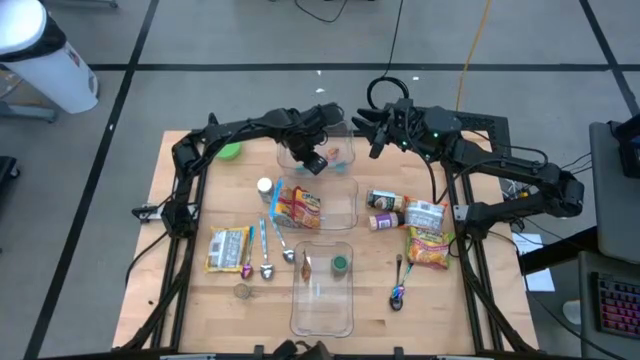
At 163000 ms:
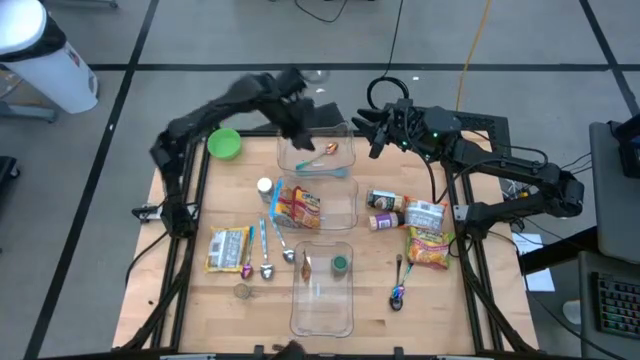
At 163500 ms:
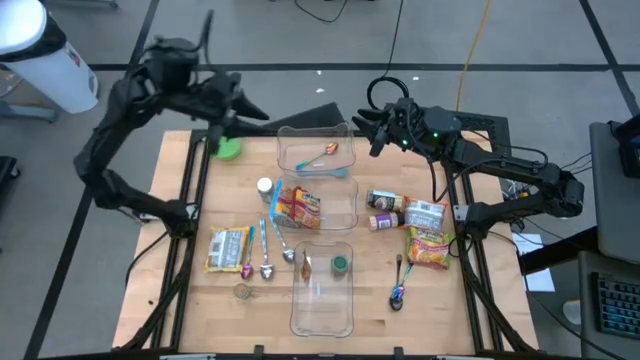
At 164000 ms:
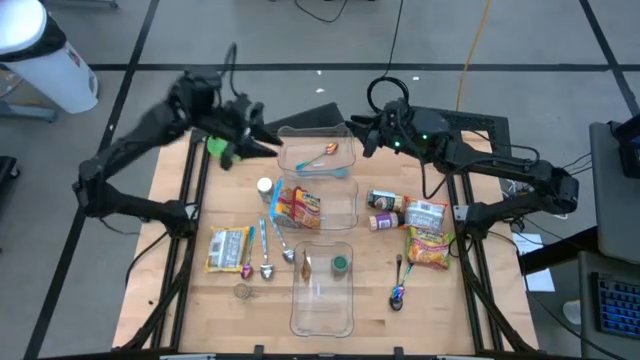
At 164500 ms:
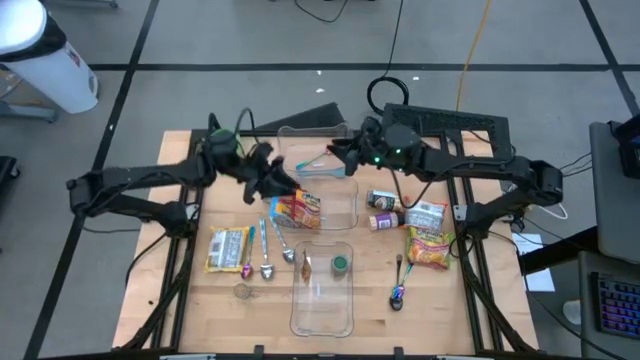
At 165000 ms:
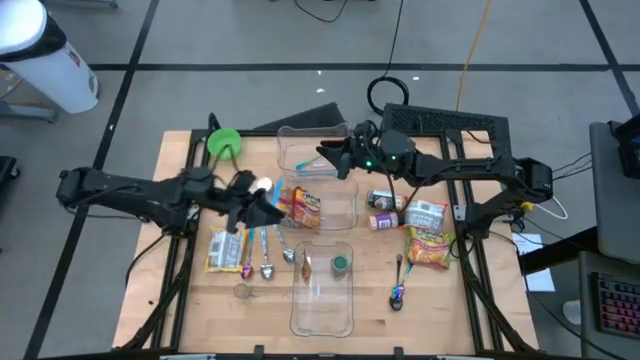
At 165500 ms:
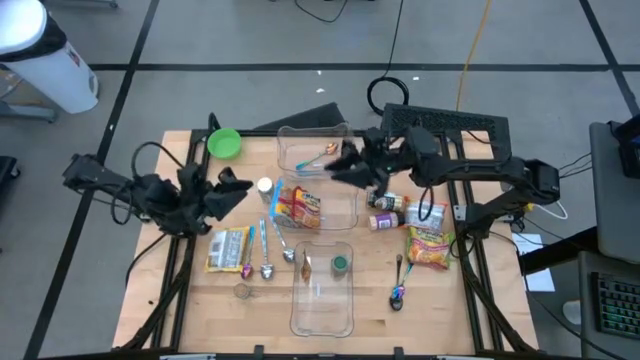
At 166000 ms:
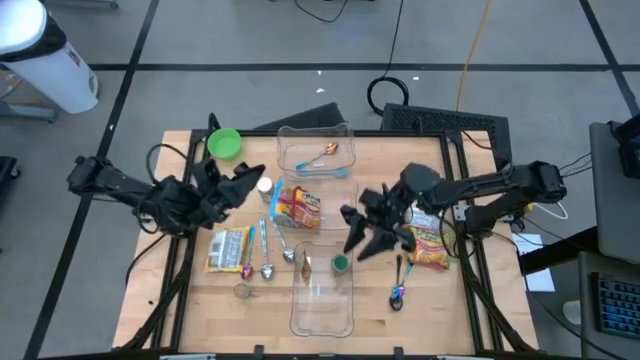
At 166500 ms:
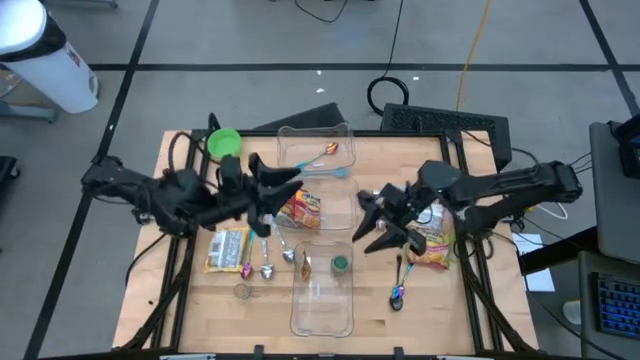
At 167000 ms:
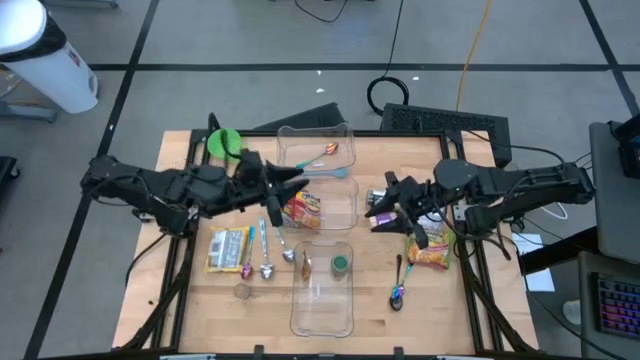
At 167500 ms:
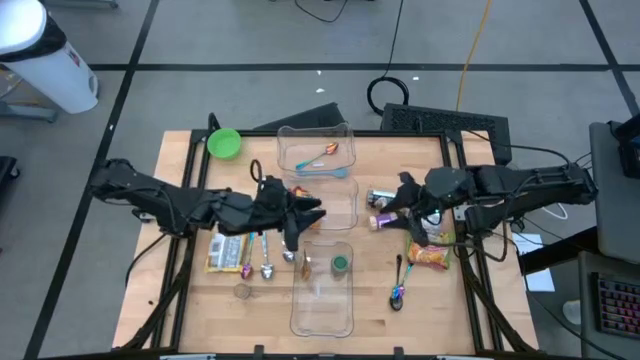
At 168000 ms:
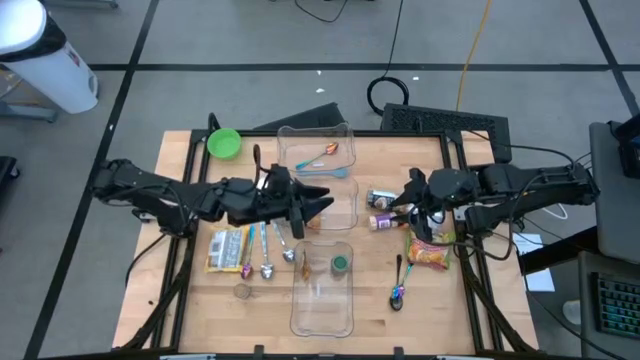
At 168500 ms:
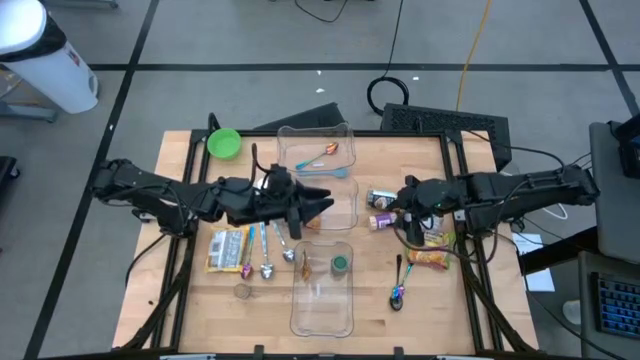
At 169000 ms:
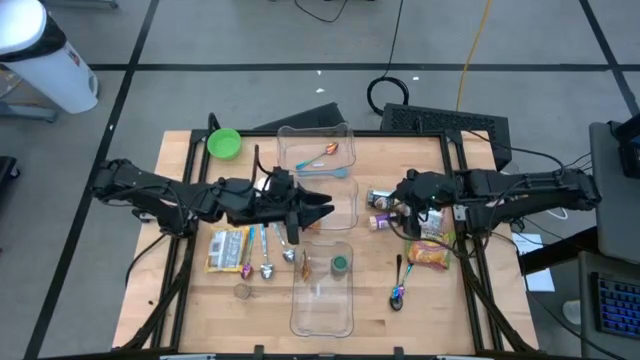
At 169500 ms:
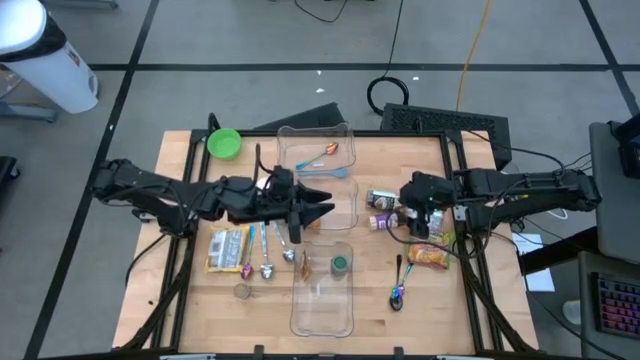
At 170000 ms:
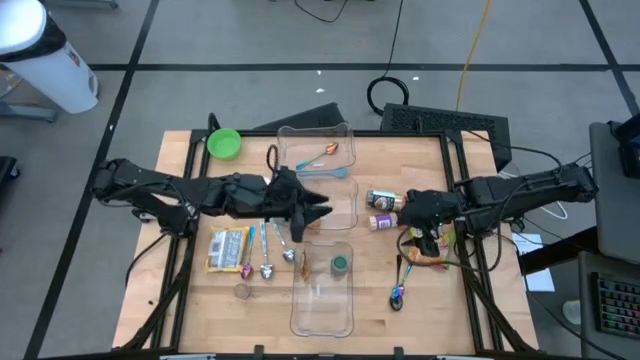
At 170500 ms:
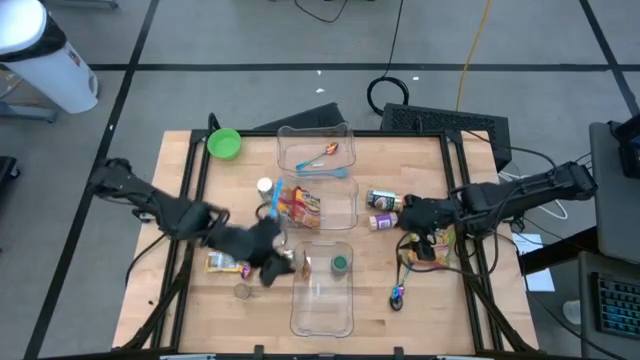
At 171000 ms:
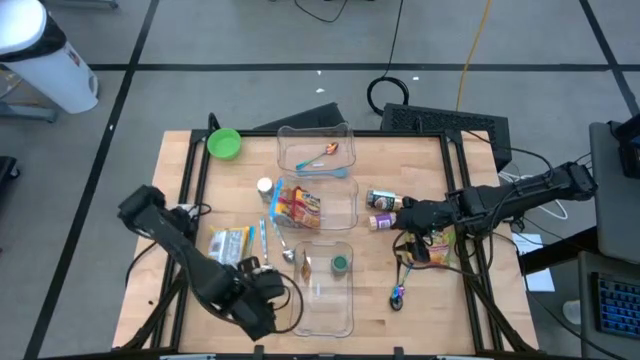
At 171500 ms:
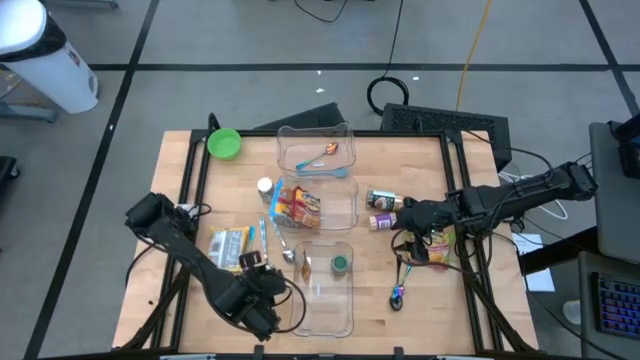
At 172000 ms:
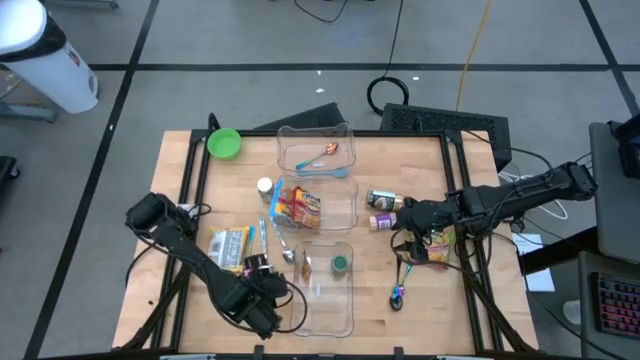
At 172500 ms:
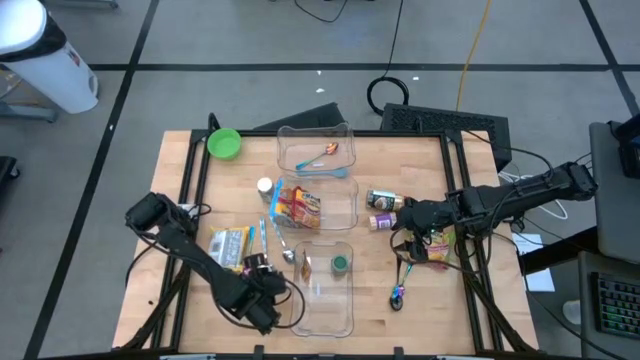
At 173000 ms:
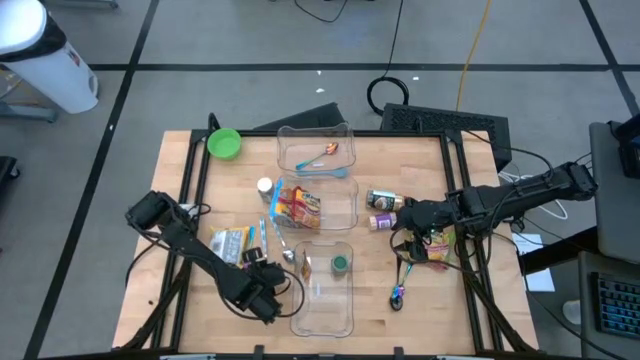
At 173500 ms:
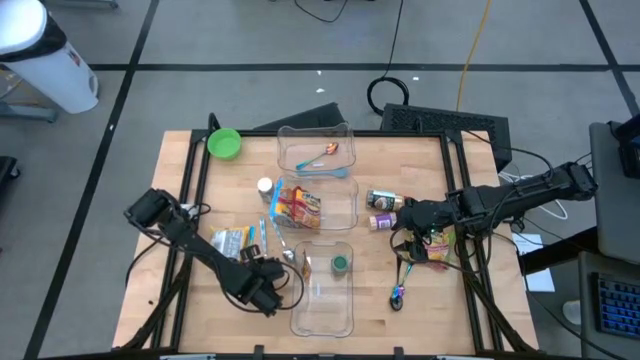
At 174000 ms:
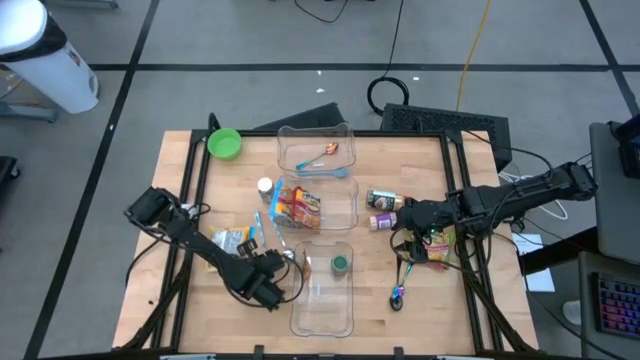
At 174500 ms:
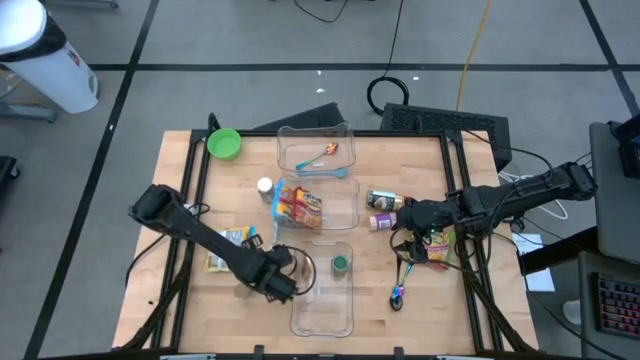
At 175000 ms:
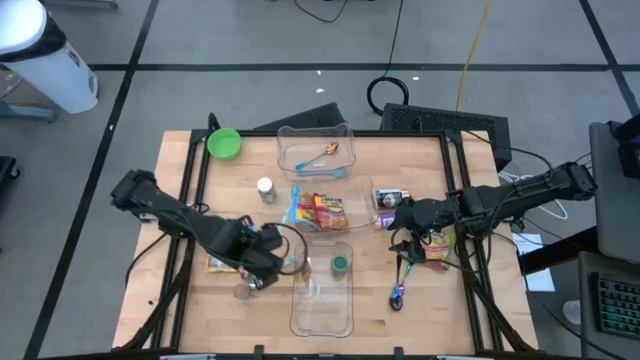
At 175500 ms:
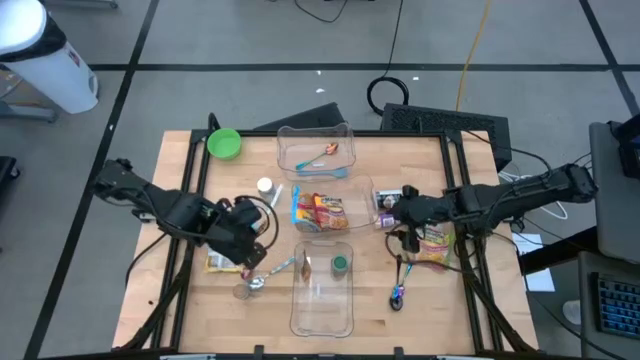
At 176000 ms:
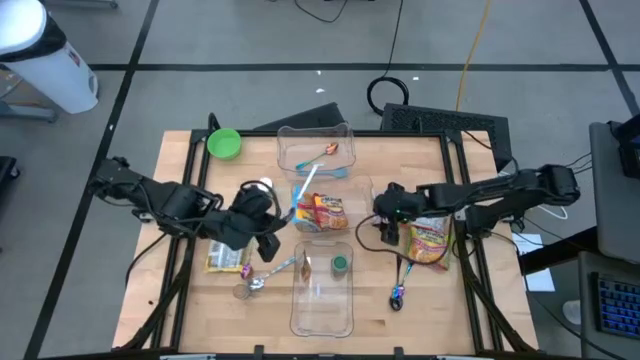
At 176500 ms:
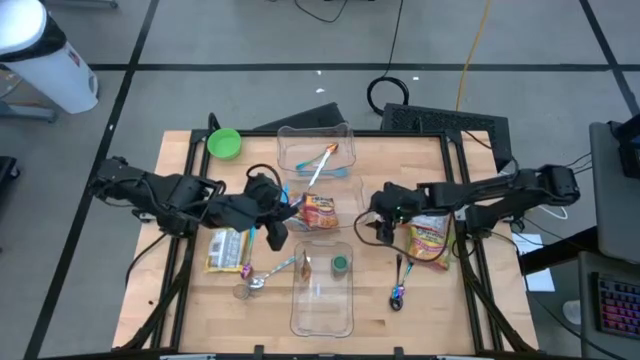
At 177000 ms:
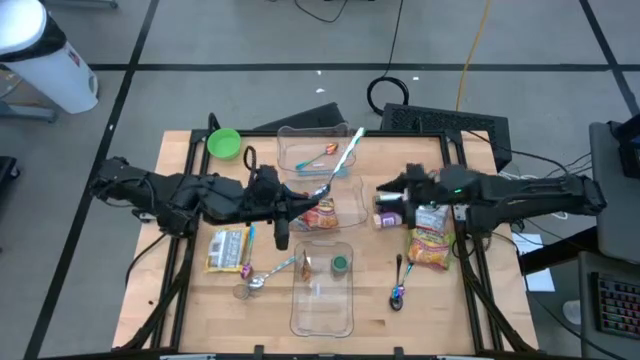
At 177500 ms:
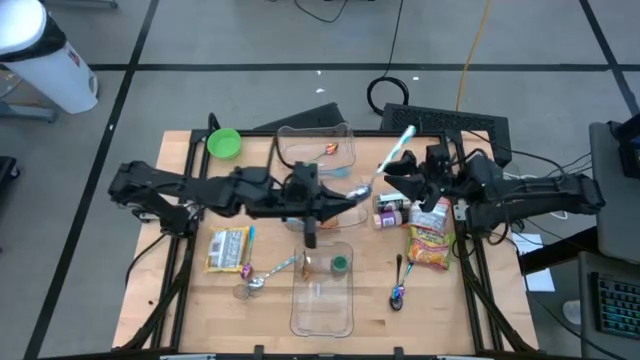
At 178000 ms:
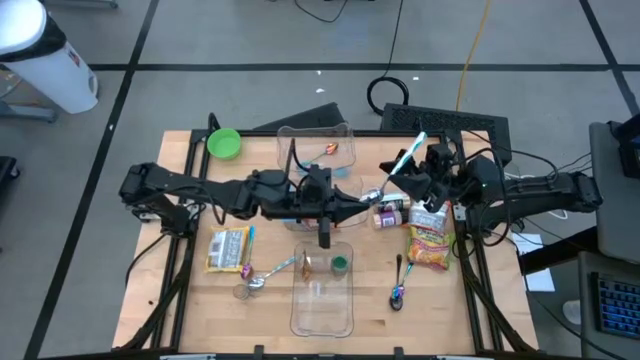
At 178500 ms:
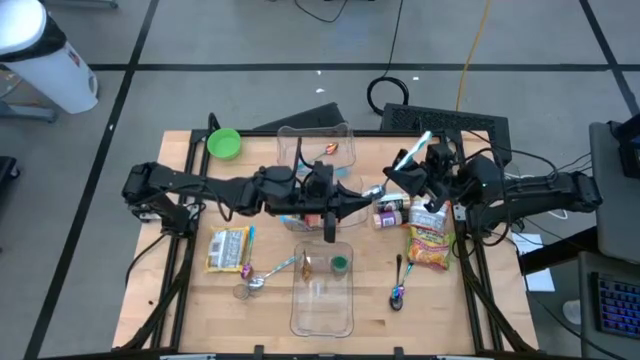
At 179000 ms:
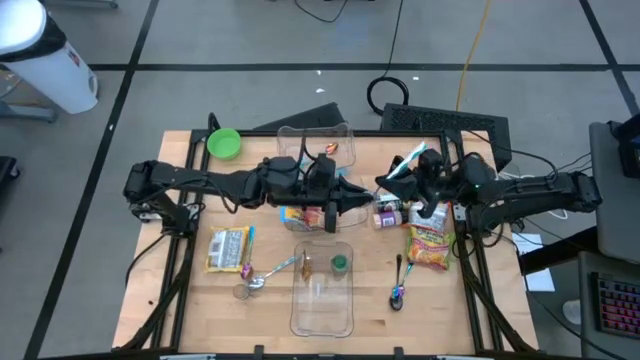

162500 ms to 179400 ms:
Task: Pick & Place Food Item
Put the left blue patterned spoon into the top transparent bin

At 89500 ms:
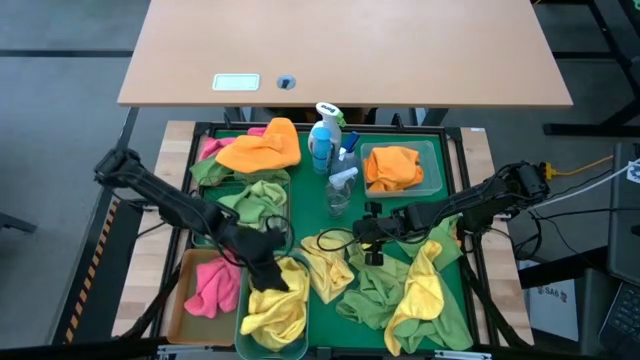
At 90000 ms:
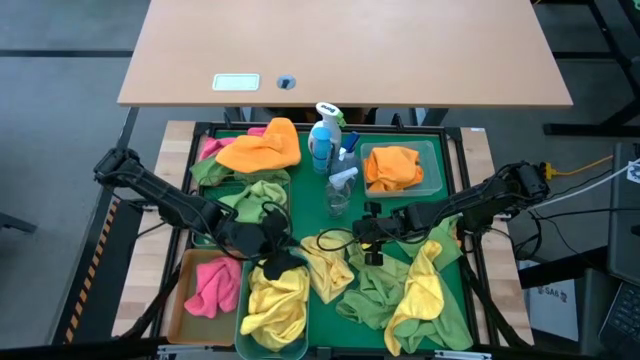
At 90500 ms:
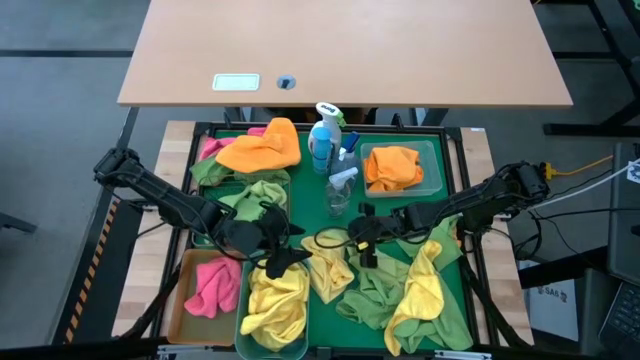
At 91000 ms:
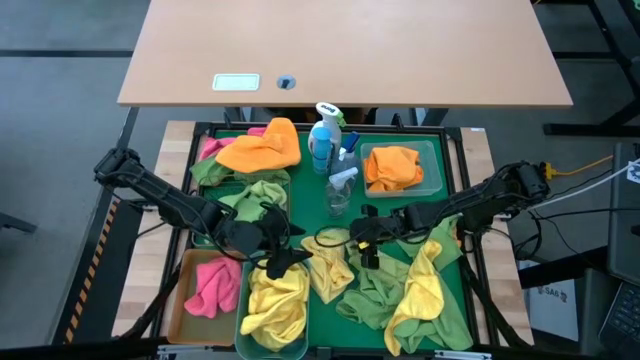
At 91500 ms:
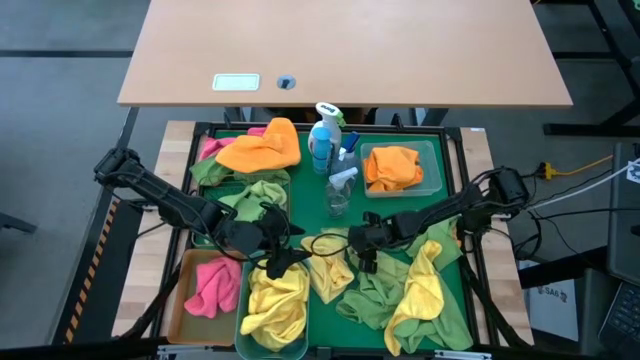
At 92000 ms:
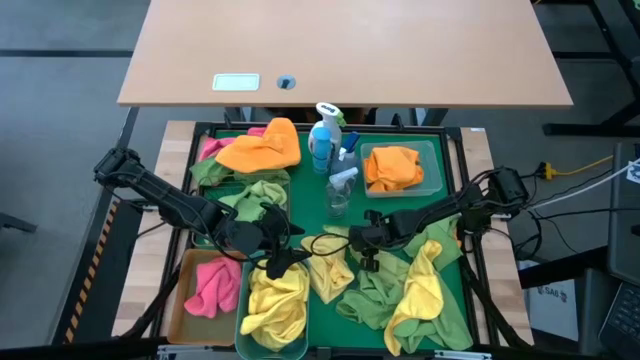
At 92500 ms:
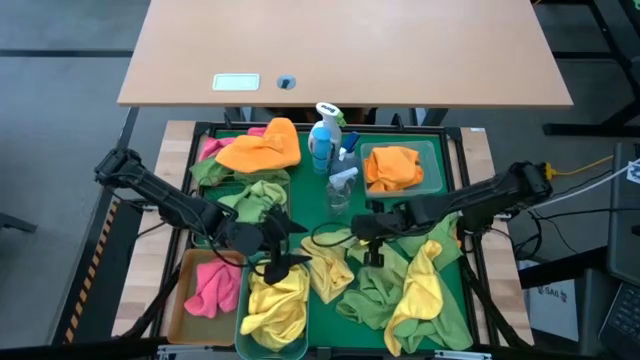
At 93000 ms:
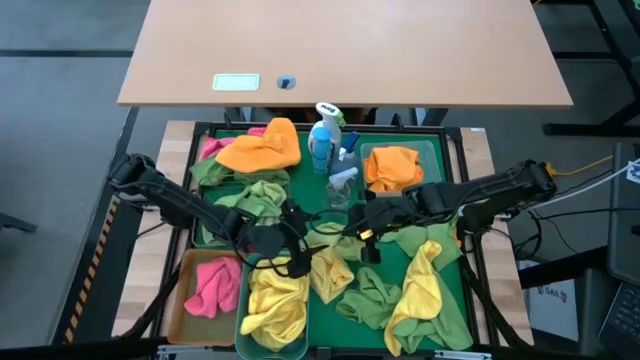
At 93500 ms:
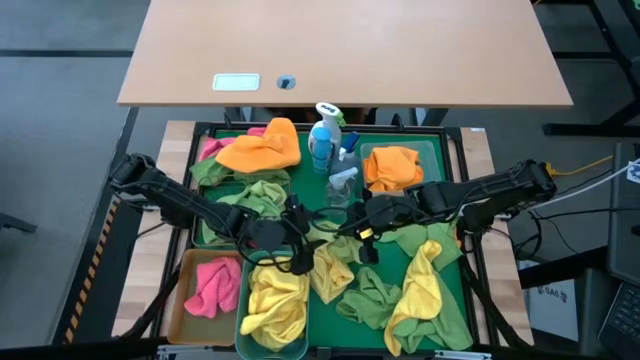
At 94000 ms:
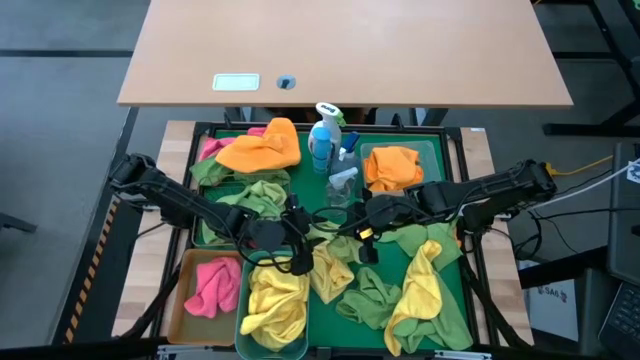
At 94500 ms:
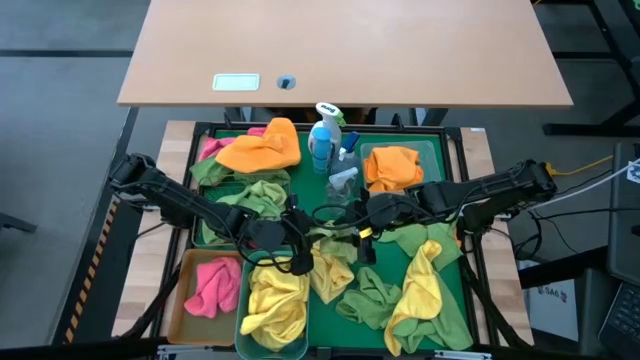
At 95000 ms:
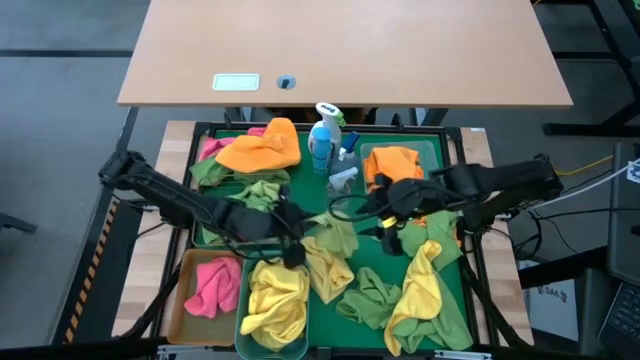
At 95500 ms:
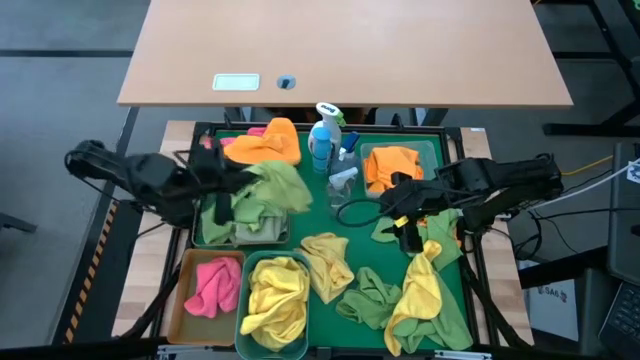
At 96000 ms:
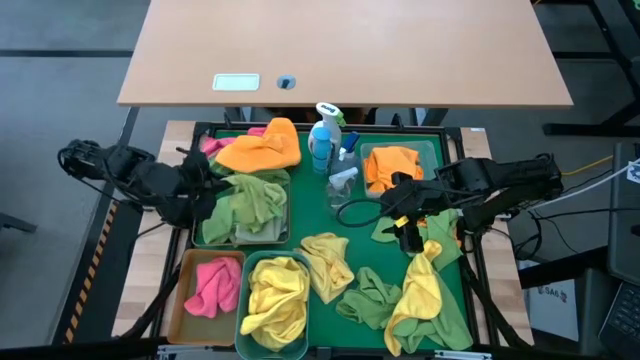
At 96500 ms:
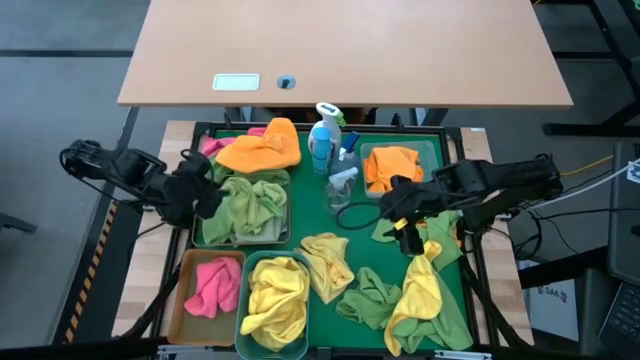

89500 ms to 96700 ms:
Task: Sort microfiber towel by color & place in baskets
Put the green towel into the wire basket
